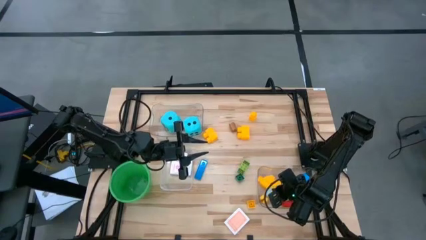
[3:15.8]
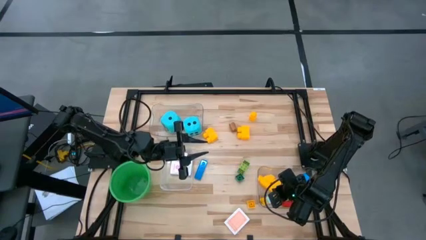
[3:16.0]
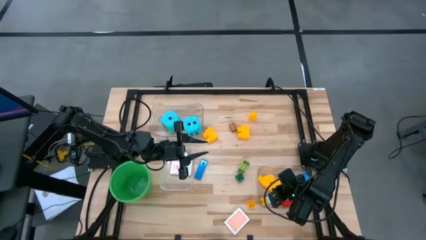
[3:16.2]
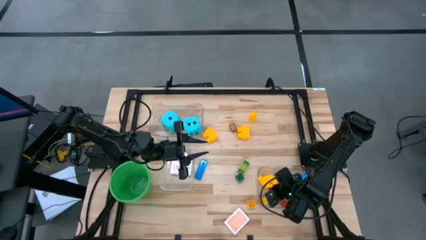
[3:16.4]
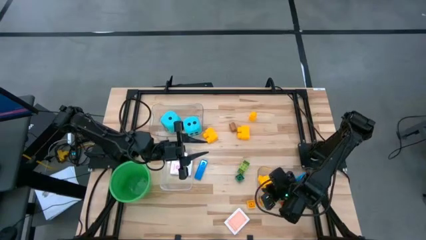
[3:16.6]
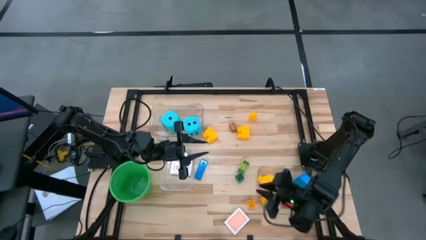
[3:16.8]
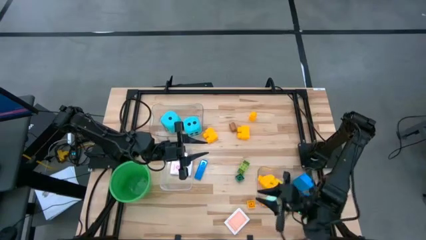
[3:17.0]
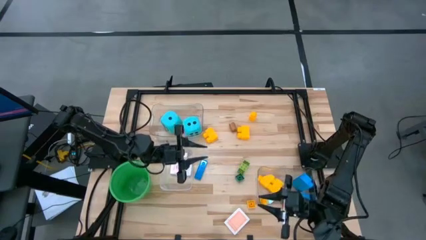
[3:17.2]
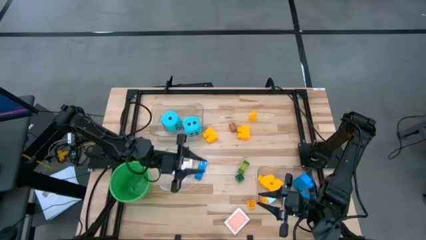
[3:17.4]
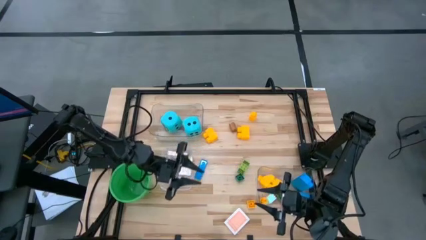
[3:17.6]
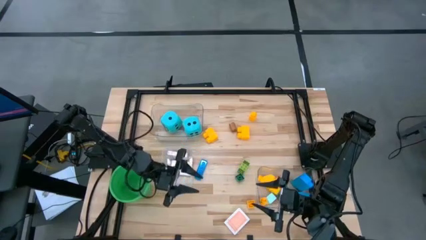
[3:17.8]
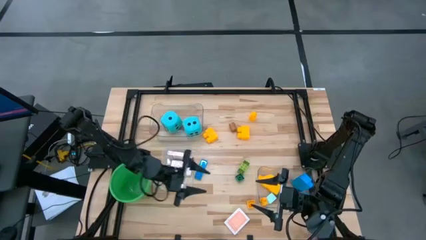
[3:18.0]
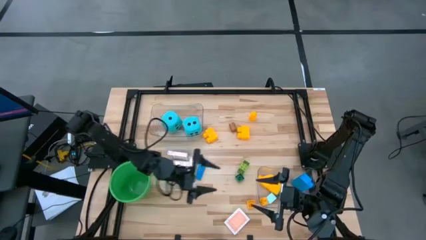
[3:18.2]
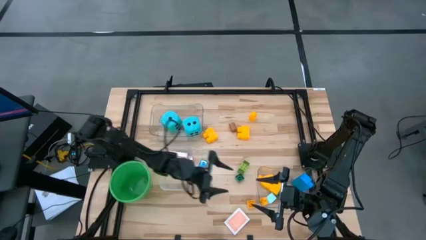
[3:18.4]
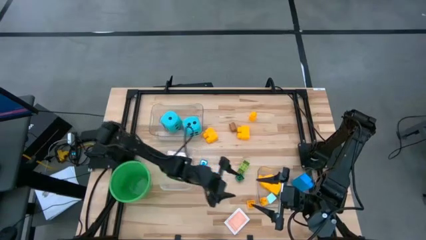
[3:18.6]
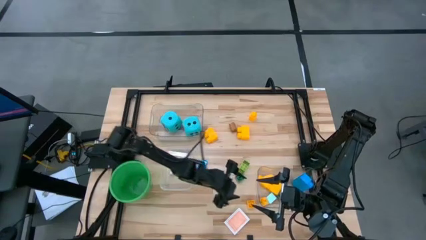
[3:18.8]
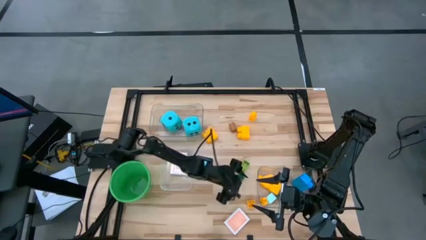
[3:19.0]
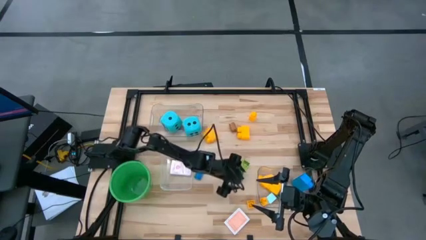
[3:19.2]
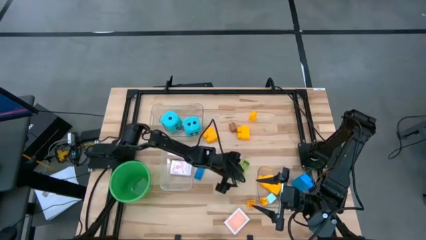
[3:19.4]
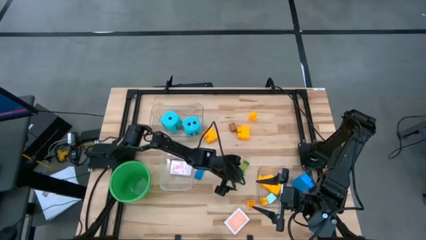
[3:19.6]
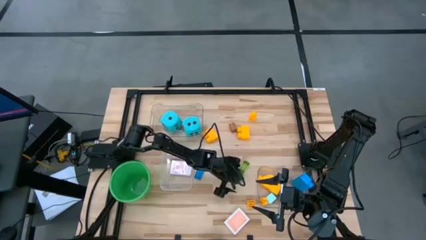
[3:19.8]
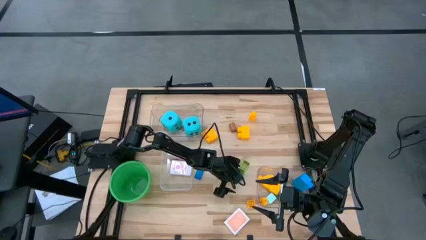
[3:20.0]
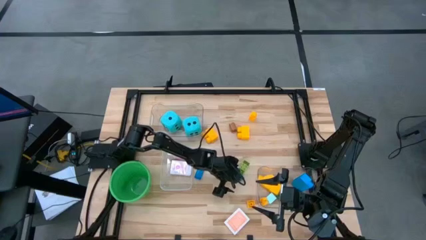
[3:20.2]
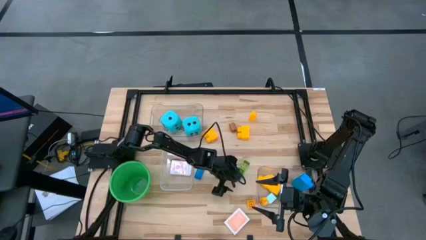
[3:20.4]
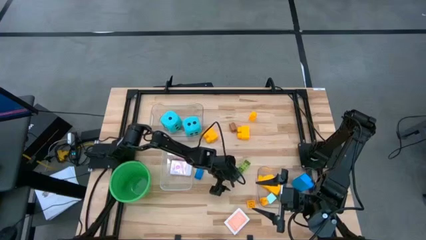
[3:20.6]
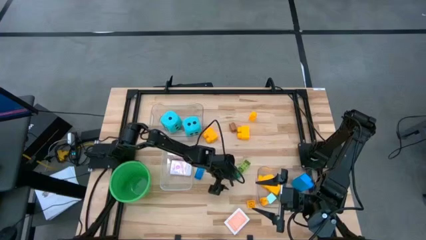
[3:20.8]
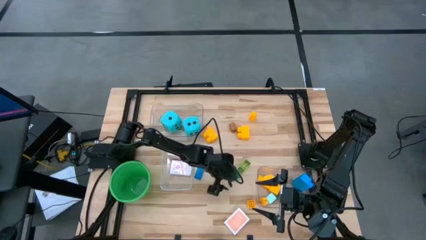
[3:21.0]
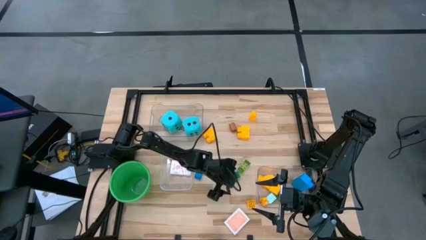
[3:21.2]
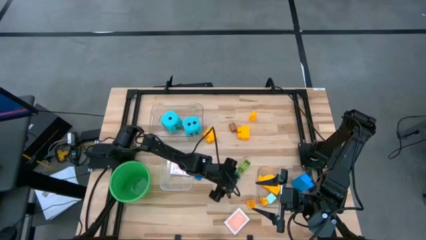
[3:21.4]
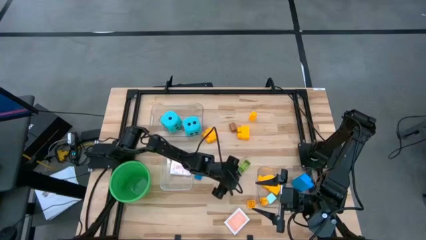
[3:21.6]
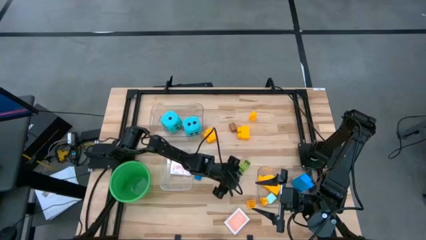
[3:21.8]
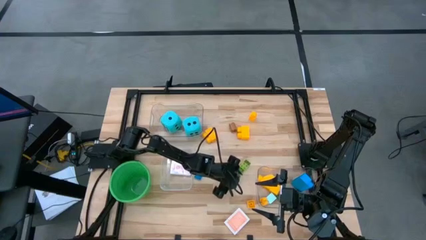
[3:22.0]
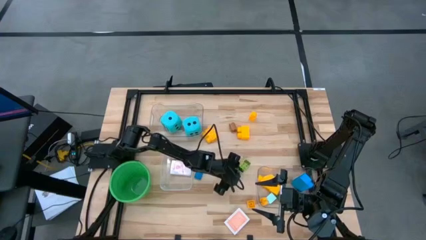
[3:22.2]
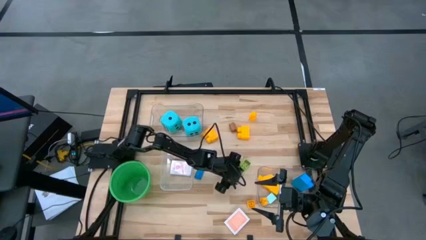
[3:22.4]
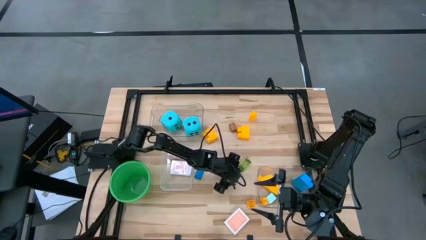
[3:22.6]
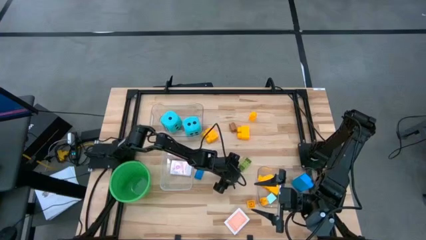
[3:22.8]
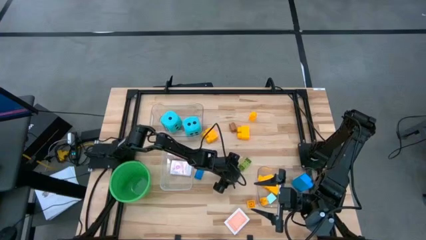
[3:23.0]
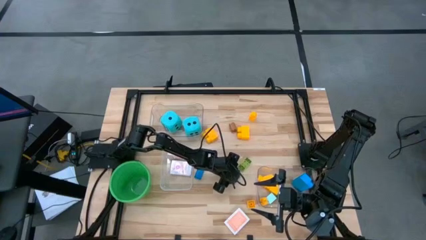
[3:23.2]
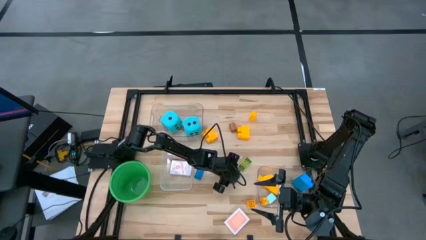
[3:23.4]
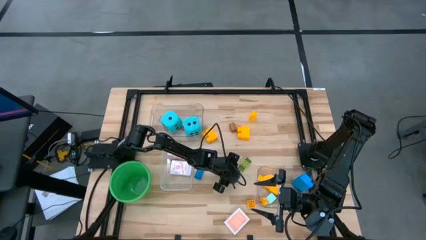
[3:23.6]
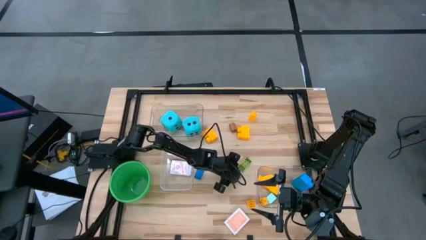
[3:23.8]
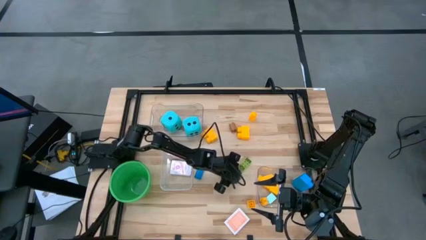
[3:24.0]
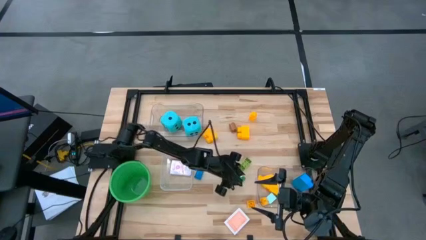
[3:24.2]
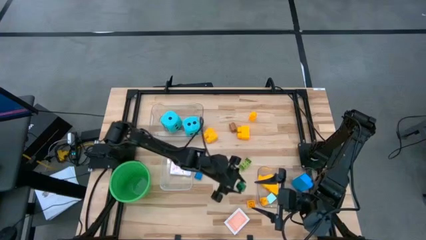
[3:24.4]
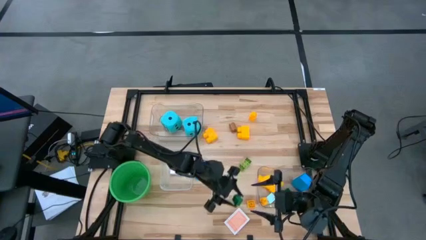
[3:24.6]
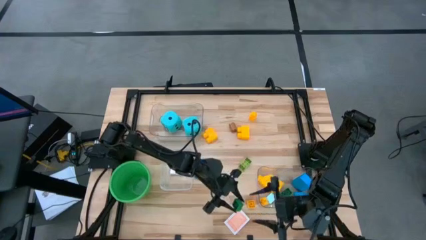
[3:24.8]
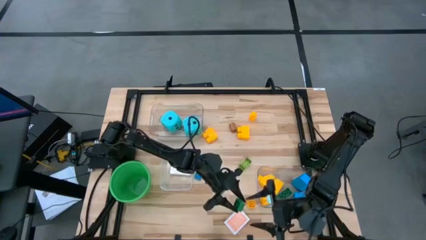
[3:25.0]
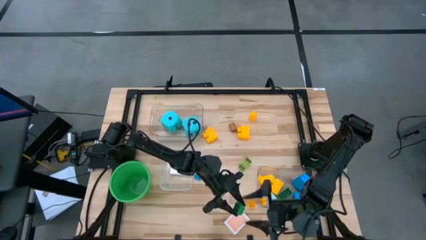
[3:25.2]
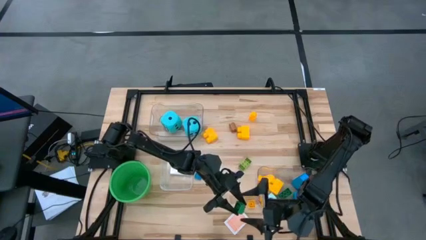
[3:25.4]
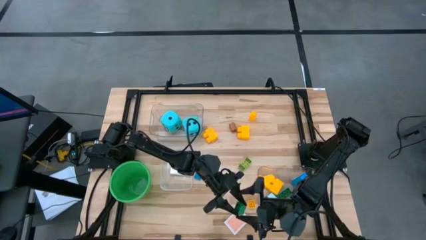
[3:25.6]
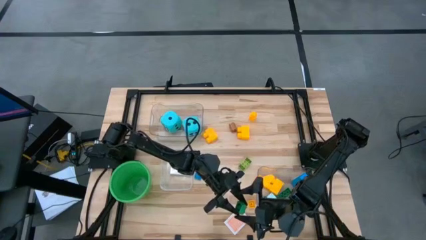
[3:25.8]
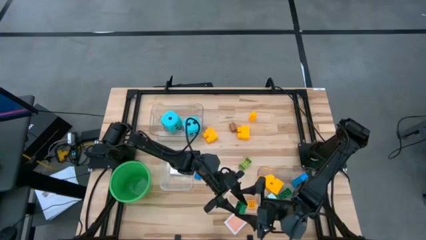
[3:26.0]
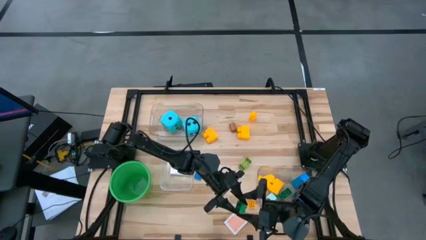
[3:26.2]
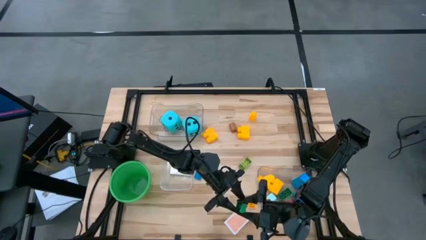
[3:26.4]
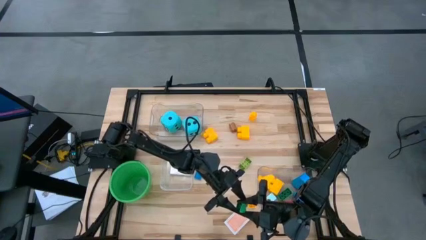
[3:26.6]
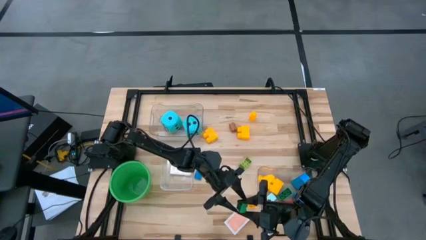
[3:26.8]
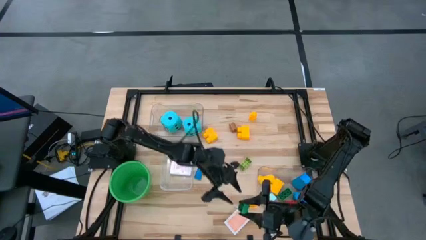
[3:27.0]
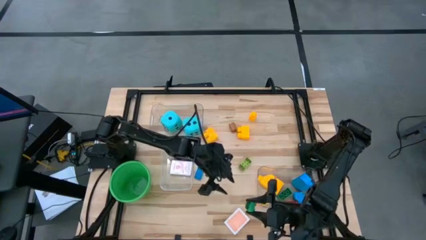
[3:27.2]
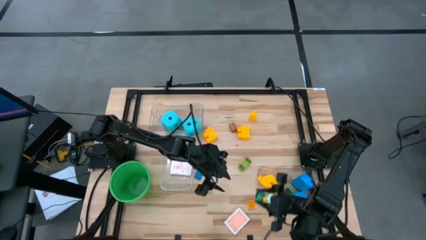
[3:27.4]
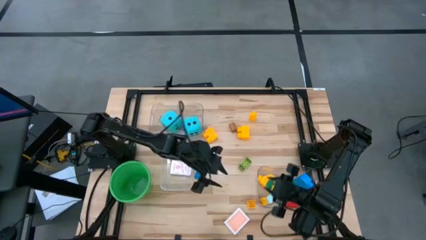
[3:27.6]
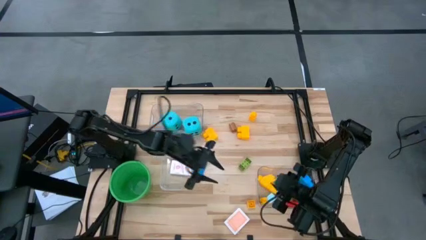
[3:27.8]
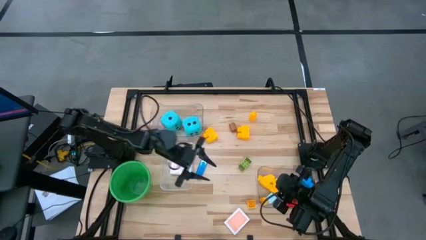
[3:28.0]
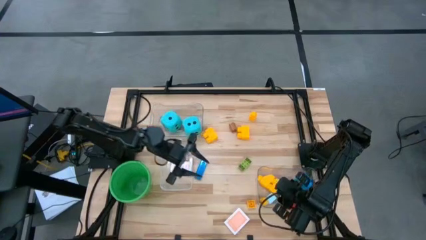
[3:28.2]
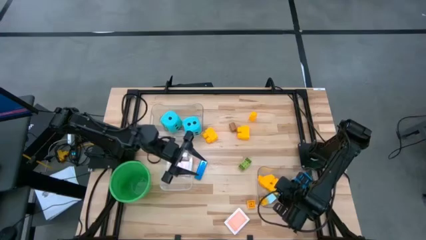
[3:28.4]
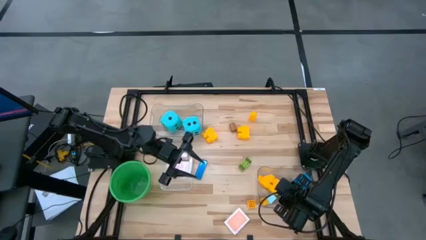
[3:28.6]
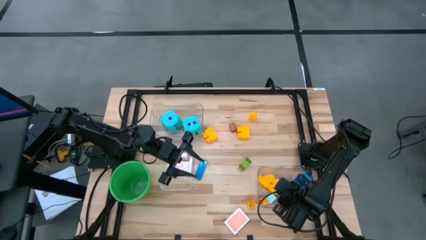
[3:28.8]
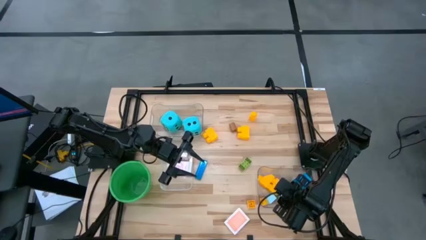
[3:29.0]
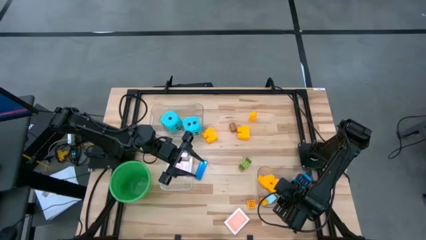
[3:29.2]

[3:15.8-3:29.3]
Task: Pick & Place Toys
Put the green game piece into the bottom right transparent bin

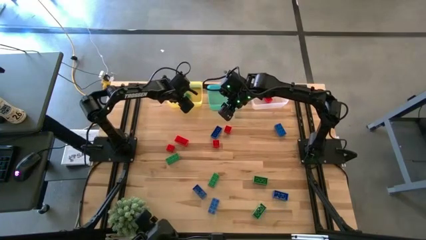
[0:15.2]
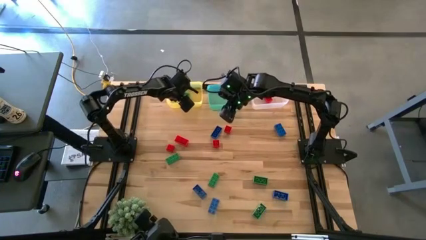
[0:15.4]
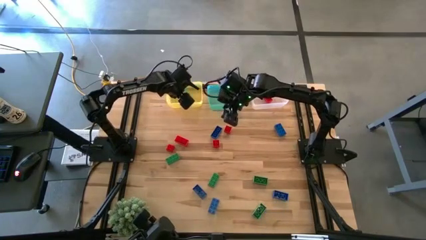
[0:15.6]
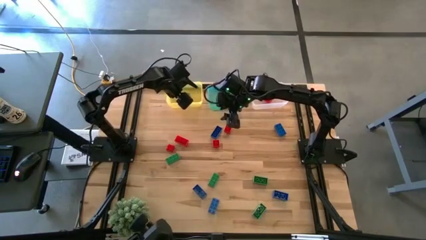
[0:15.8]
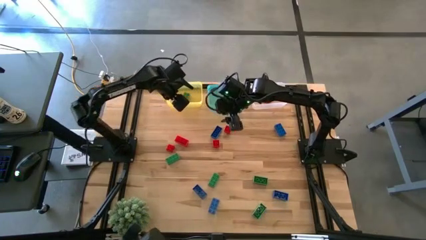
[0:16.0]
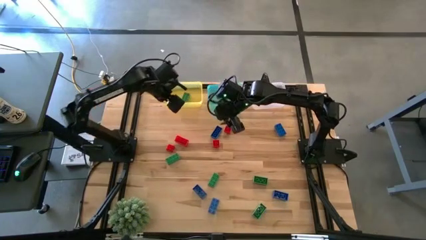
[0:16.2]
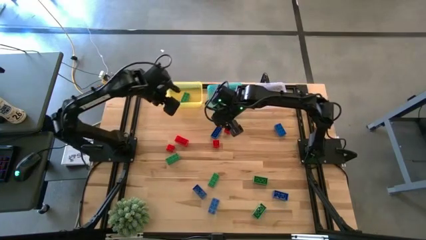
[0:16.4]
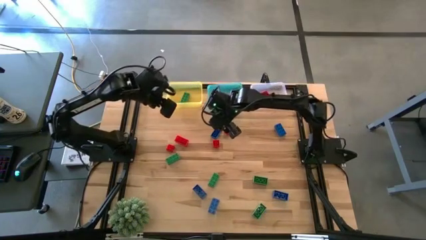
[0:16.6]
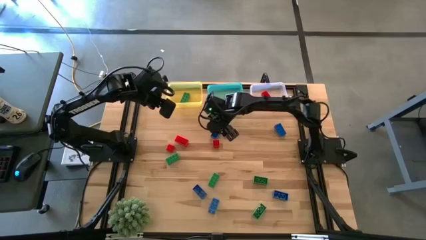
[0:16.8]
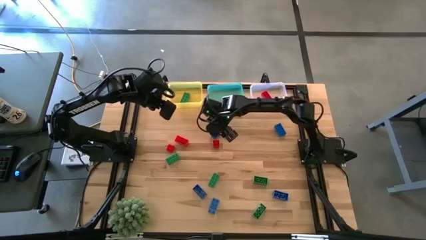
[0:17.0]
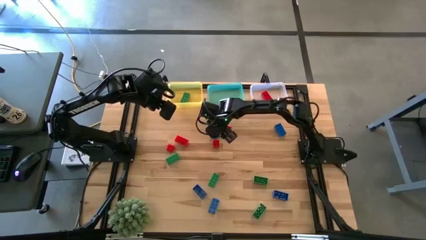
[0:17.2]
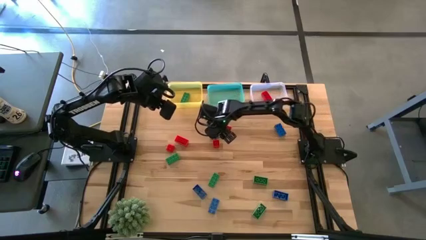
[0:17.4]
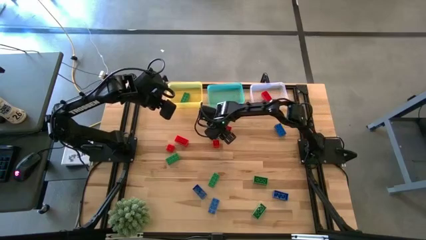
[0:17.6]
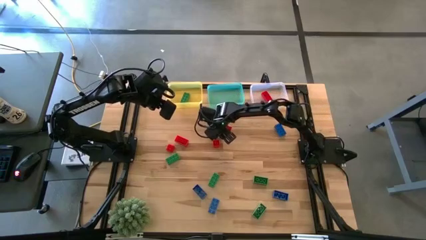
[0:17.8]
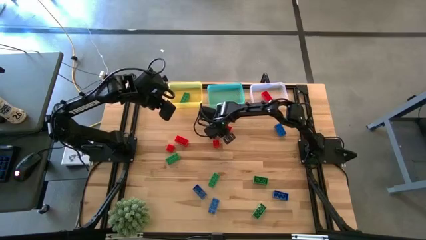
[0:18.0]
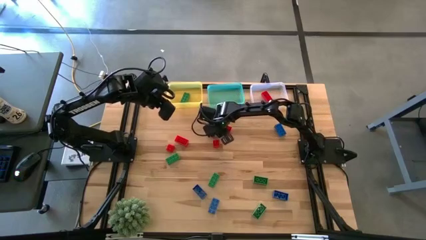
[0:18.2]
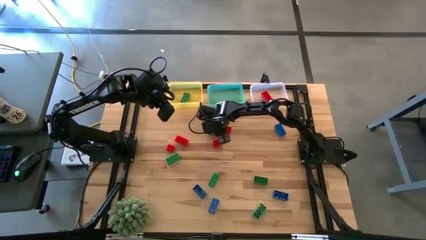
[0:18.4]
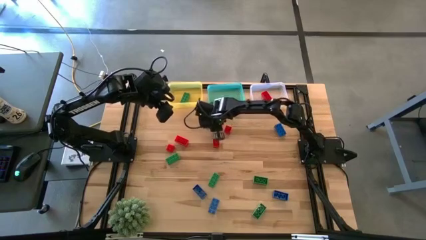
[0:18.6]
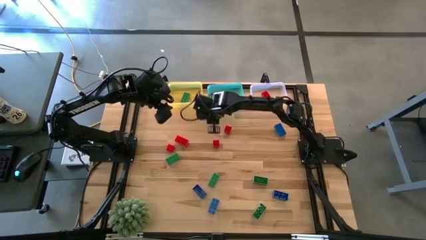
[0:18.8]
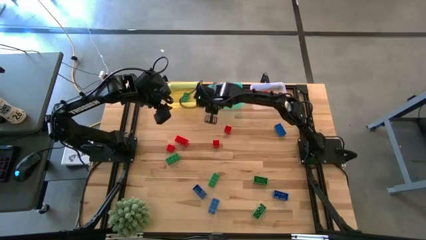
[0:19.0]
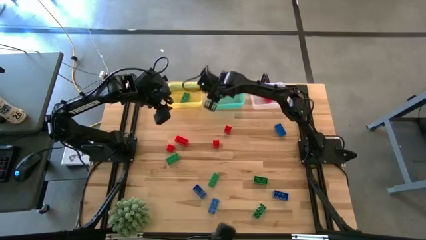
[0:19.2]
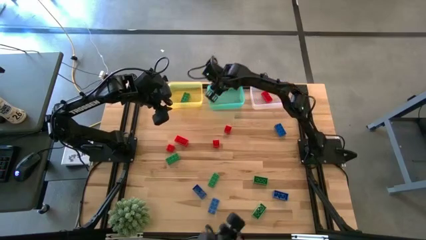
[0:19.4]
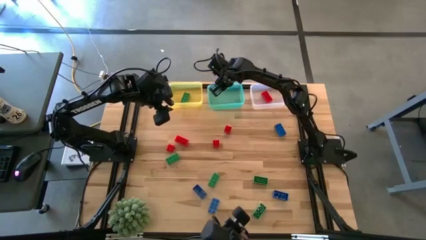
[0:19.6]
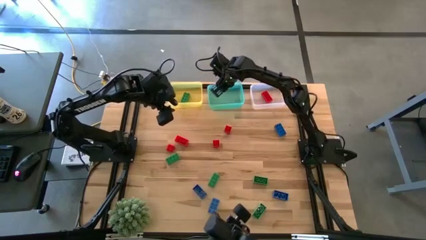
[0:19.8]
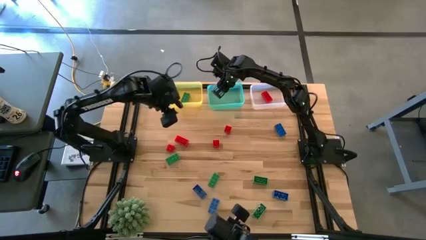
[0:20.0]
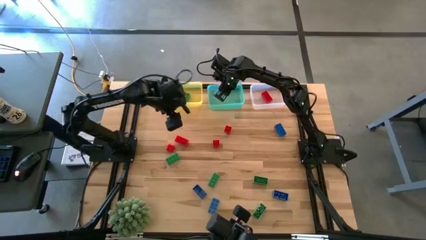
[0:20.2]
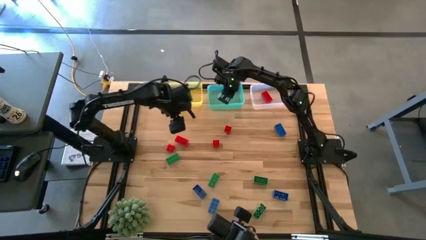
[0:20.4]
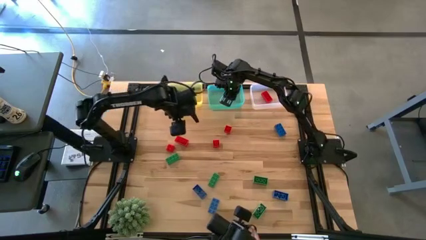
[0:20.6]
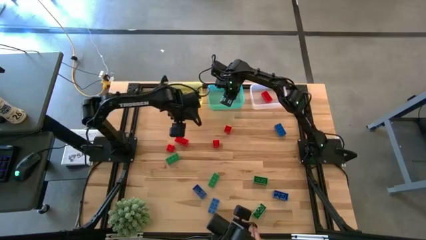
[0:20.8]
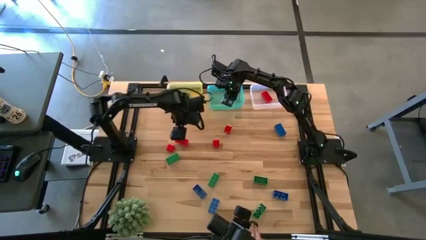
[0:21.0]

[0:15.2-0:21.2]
Task: Sort & place blocks by color
Put the blue game piece into the blue bin
